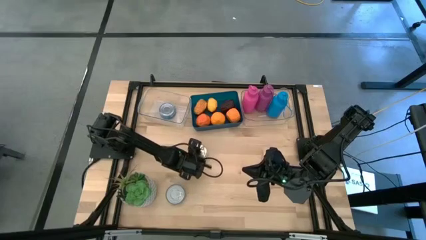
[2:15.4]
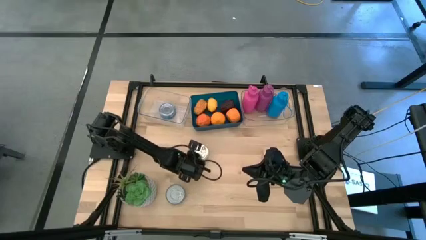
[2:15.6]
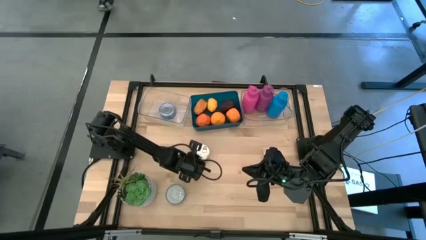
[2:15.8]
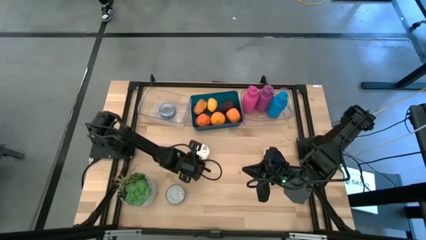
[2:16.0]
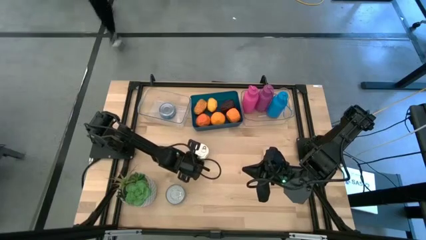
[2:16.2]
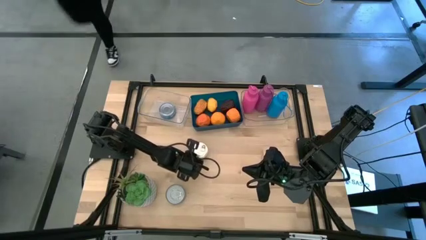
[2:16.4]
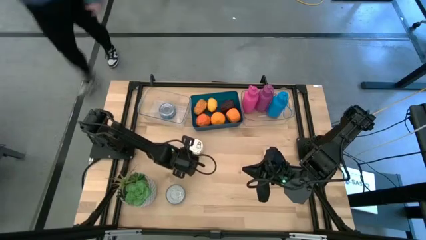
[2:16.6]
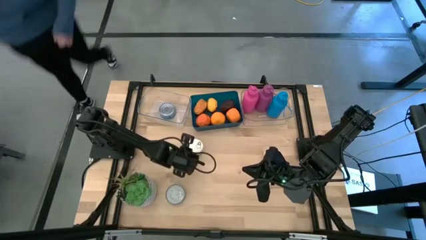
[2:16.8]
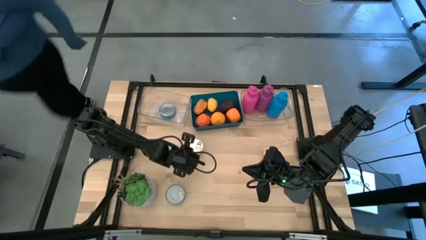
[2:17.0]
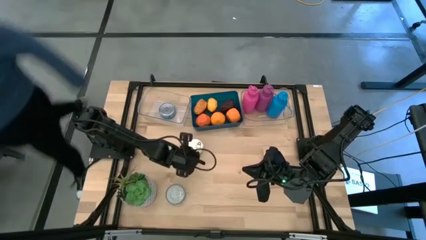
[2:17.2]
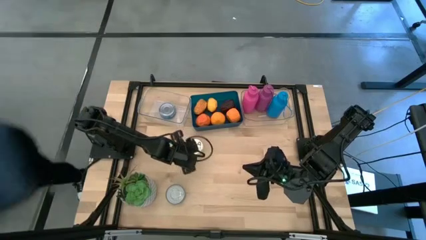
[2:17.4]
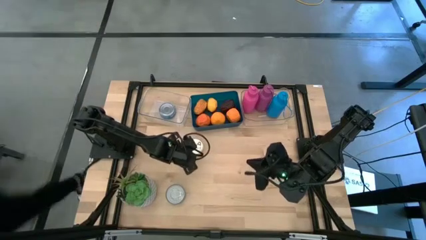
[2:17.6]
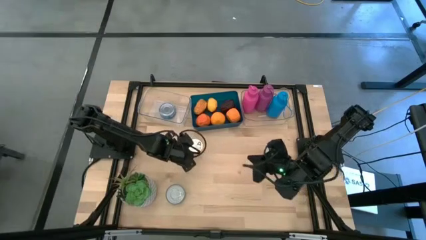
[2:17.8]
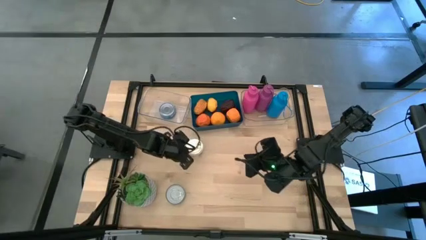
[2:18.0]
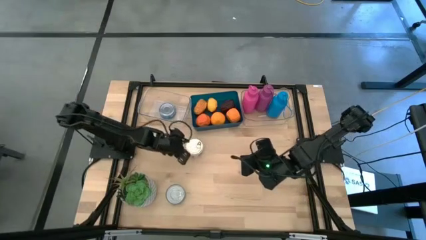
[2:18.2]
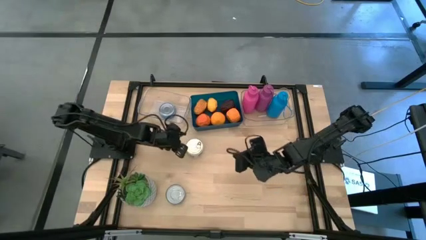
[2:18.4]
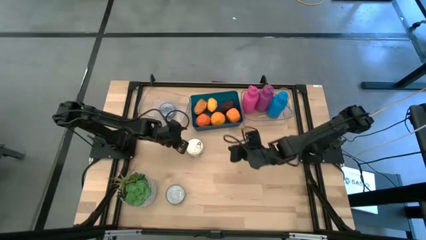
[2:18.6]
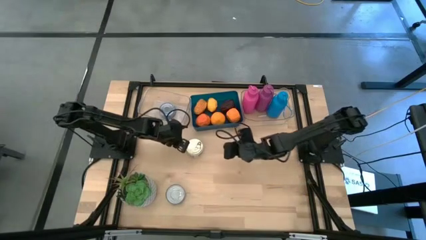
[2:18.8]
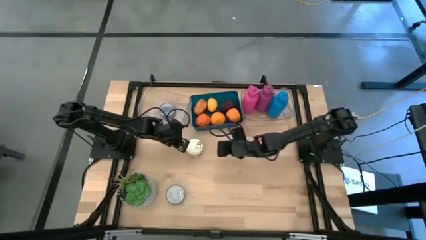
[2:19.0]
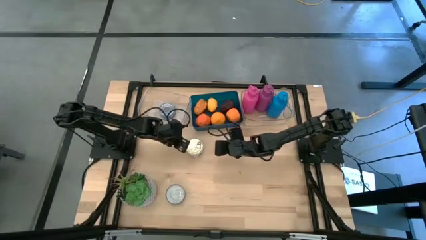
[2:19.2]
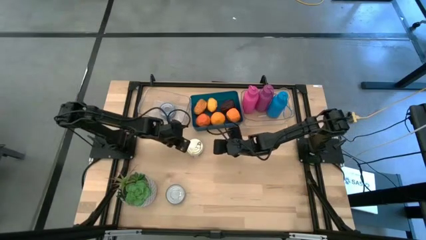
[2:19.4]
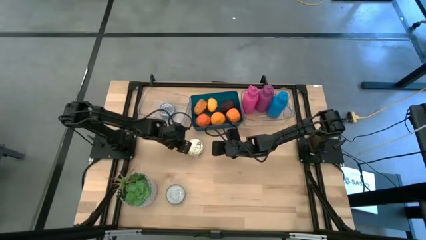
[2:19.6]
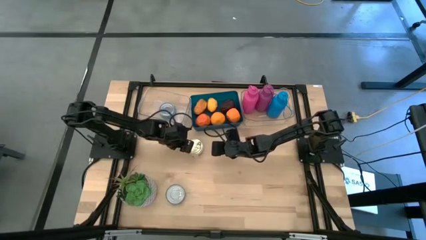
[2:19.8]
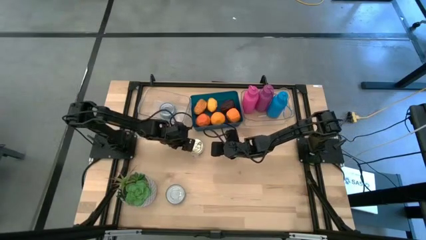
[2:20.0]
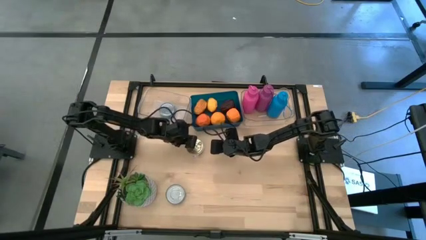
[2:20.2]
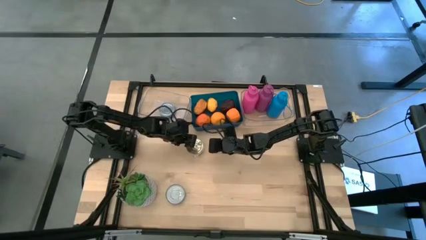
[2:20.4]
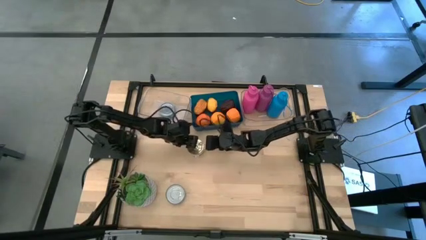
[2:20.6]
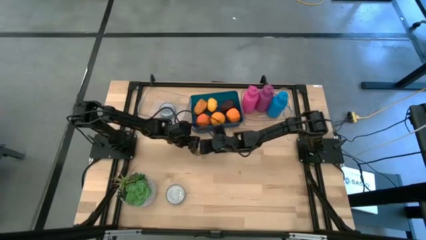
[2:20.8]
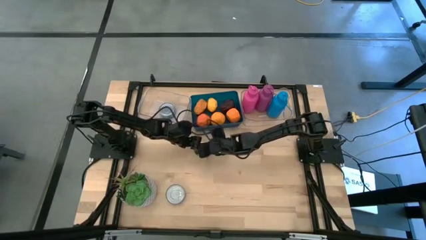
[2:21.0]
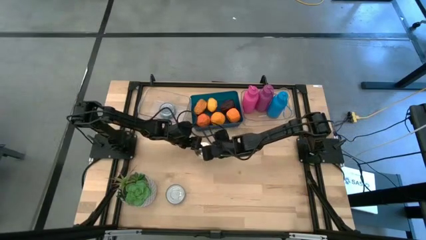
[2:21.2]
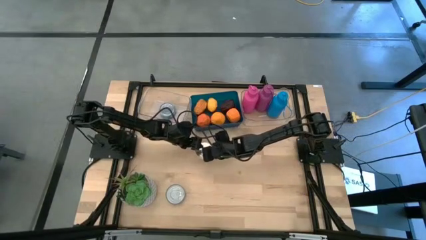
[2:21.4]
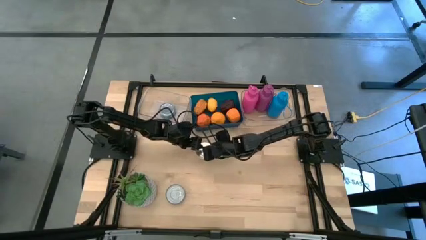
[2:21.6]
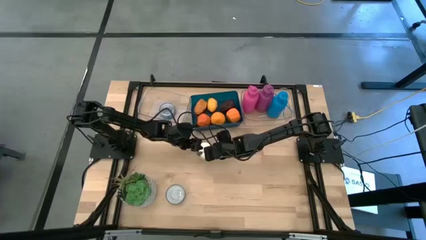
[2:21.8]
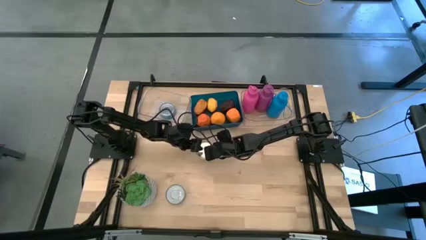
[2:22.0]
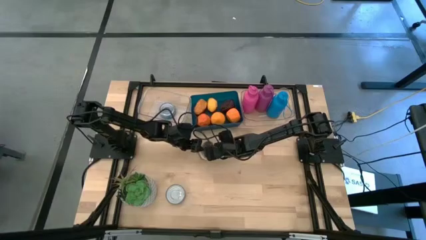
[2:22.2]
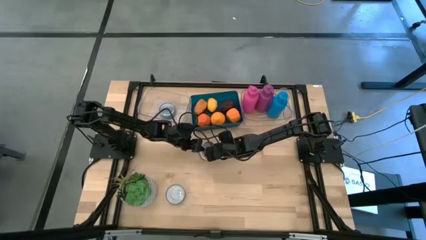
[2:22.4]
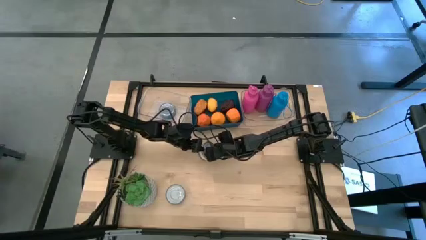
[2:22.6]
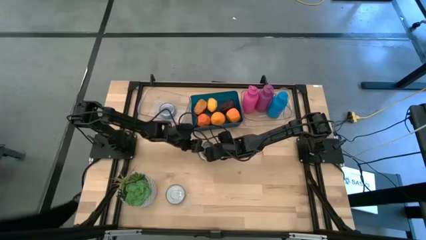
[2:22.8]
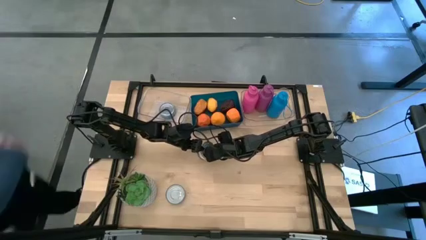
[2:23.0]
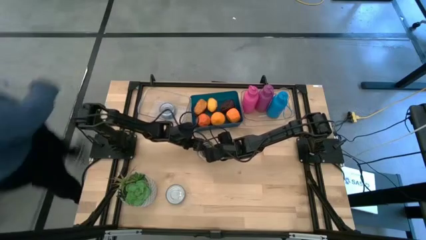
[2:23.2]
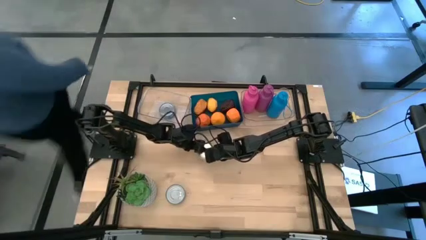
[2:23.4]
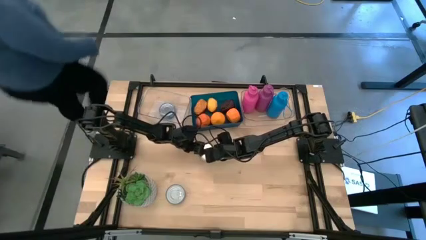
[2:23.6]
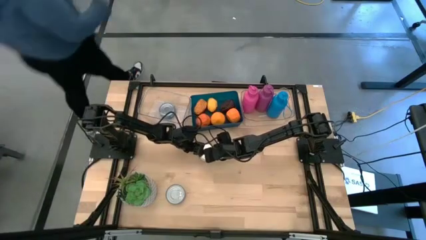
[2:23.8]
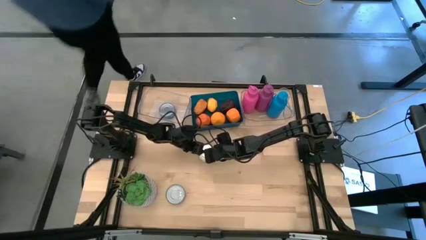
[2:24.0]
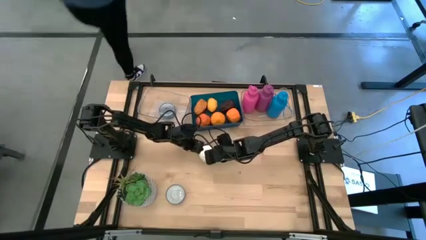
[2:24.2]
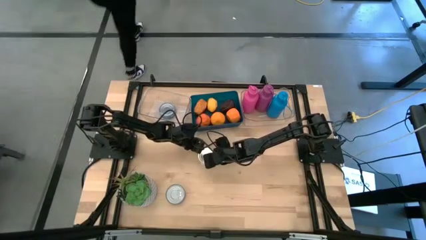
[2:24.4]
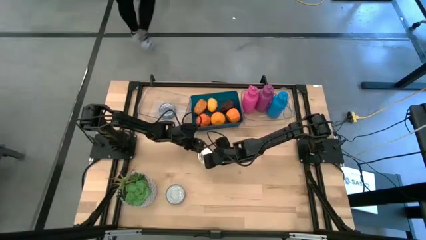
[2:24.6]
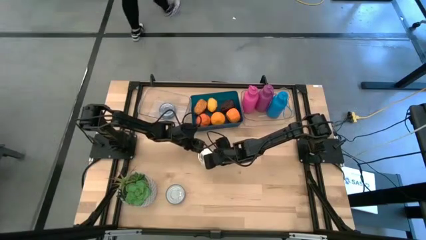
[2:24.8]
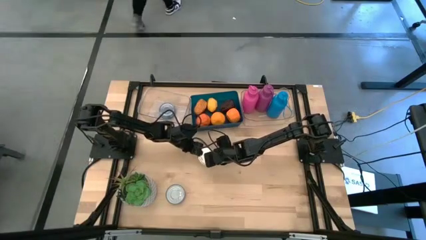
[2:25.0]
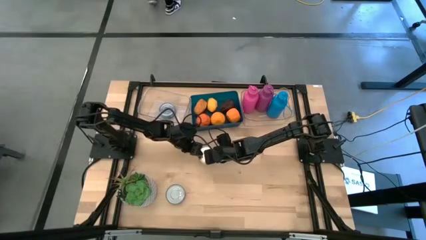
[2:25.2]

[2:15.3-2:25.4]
Task: Pick & Place Food Item
Put the blue pink tuna can into the left transparent bin

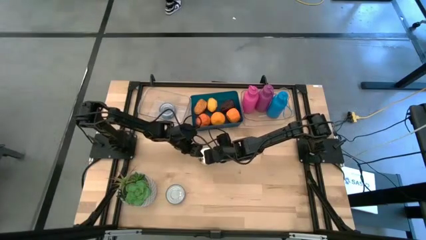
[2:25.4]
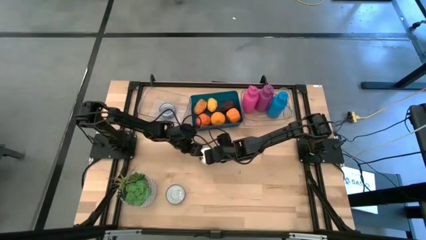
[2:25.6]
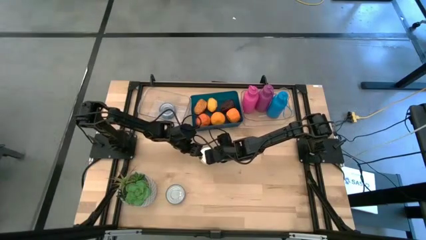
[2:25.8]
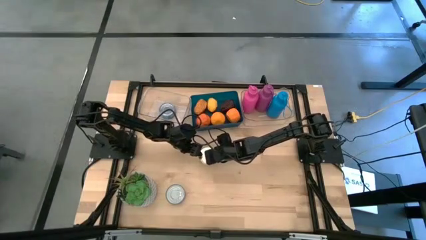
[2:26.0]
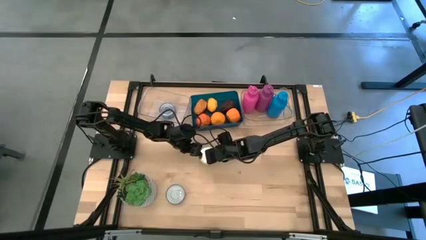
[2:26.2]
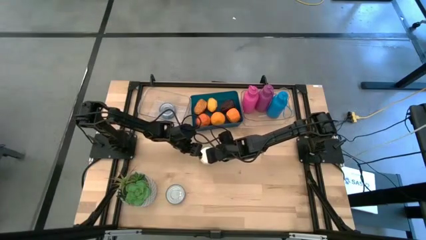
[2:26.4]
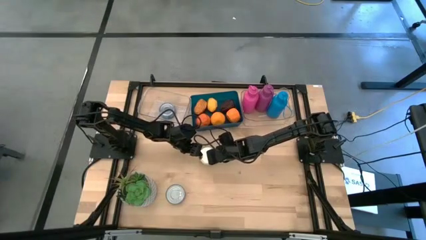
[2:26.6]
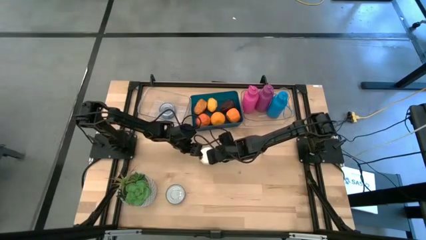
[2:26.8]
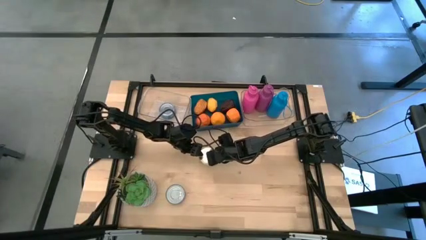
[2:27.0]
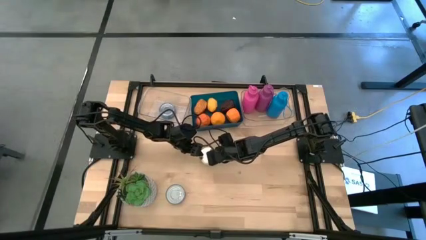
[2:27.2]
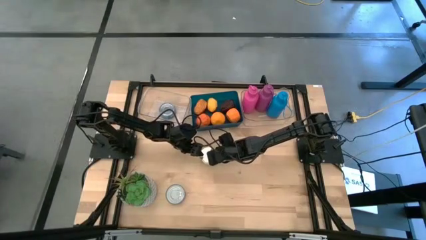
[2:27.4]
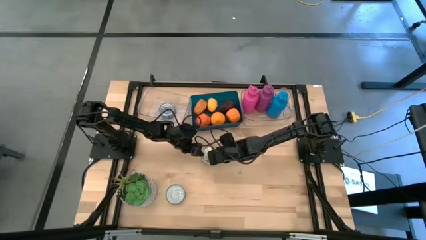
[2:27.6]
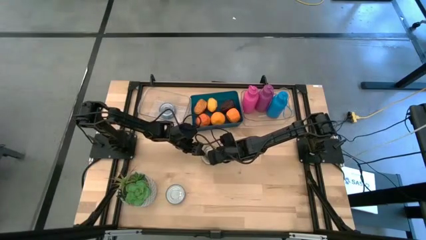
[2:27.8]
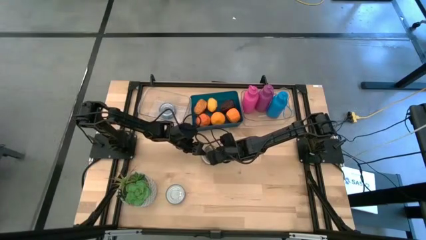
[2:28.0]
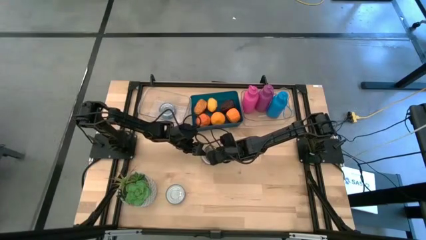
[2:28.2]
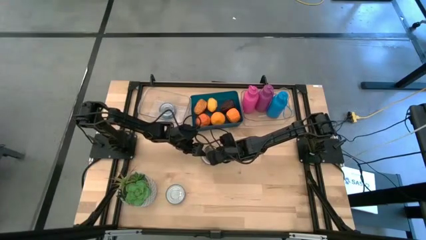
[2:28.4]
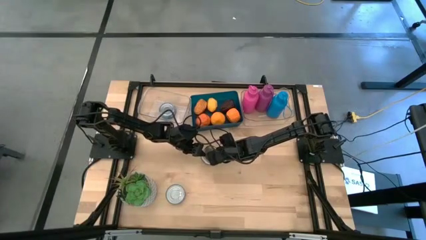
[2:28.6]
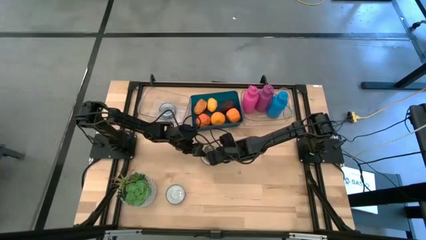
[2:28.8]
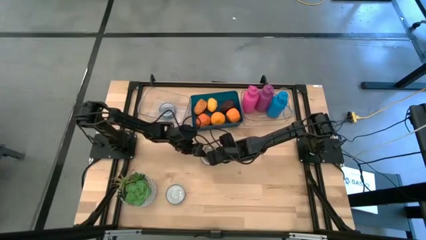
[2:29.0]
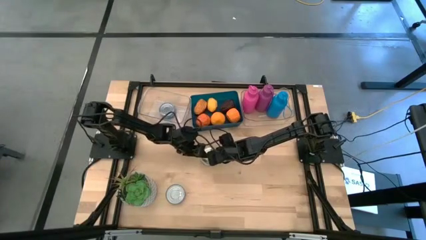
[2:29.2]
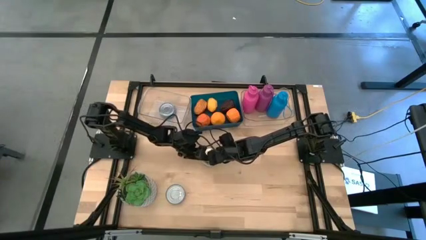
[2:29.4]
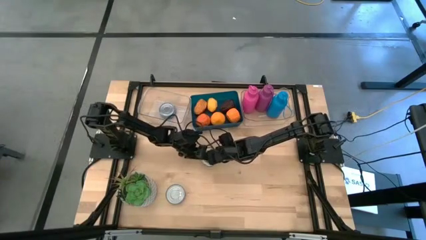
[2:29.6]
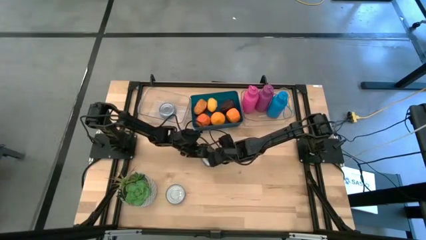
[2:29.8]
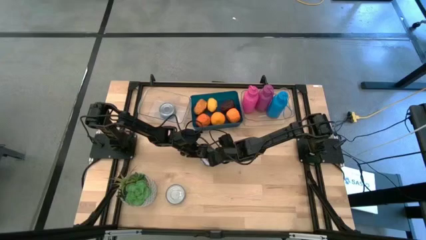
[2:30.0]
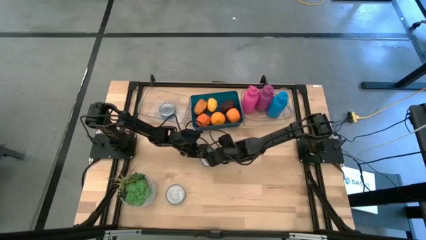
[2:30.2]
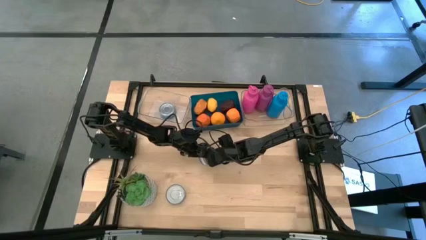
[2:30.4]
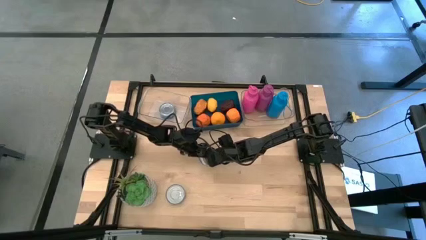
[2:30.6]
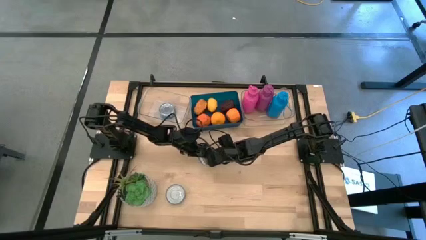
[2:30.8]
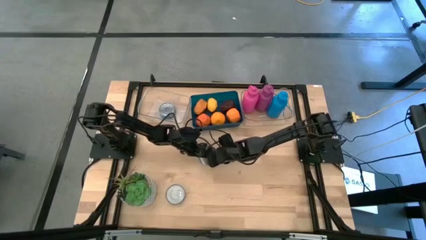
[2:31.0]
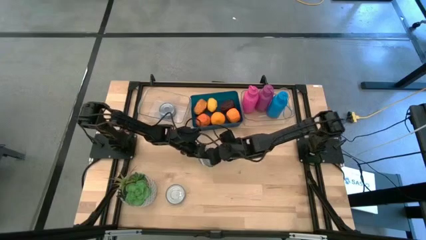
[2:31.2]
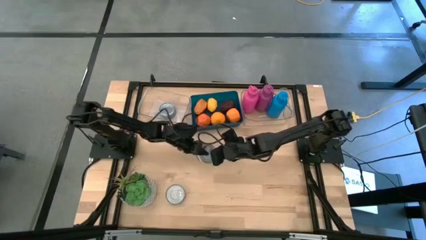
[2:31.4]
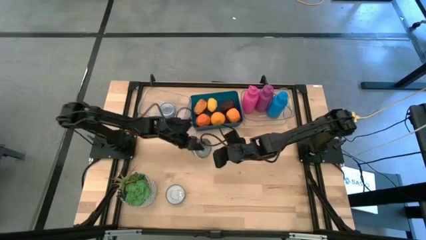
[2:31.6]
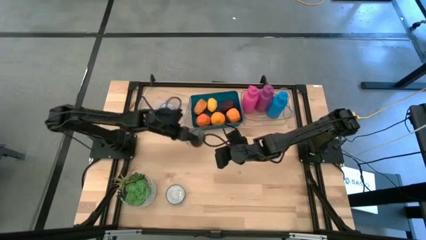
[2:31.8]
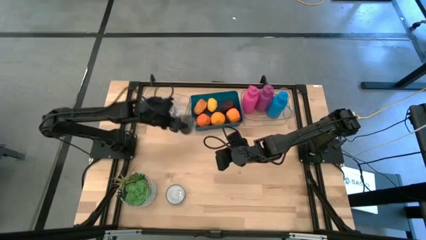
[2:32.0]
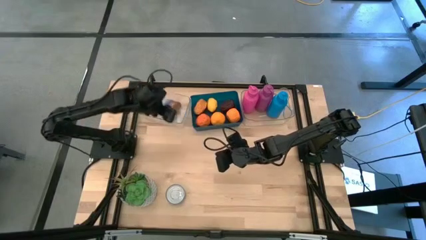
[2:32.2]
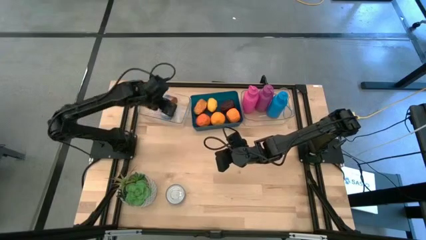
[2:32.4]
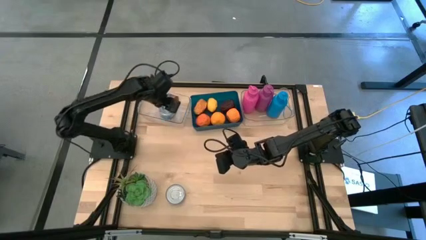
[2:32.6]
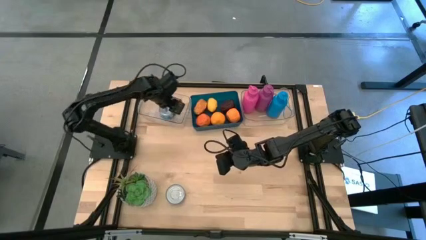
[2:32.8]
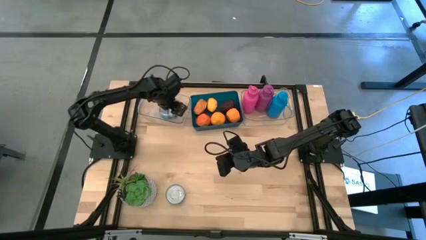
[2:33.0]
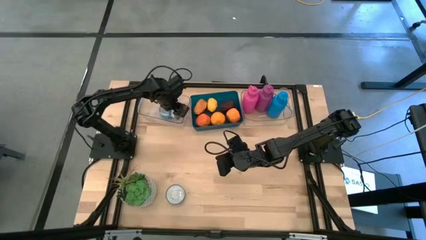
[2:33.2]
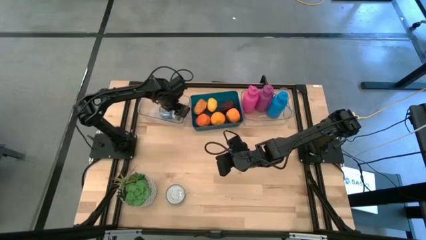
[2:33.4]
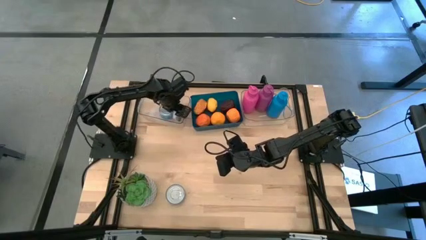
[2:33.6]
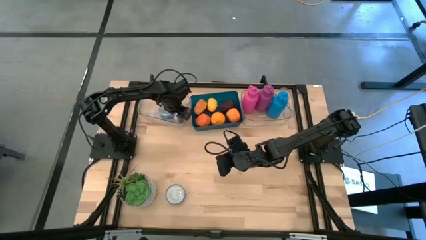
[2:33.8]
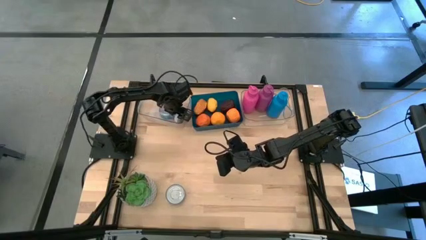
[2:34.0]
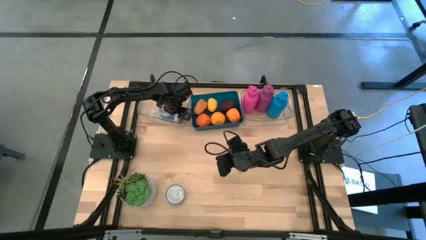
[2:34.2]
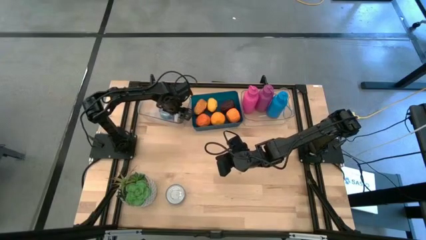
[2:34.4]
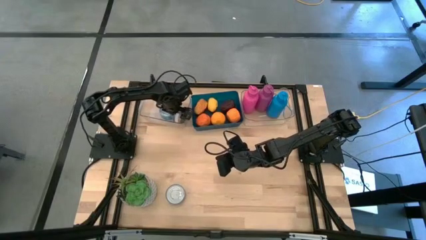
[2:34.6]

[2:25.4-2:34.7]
Put the blue pink tuna can into the left transparent bin
